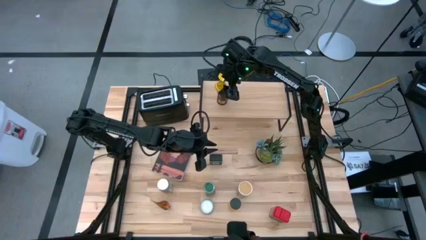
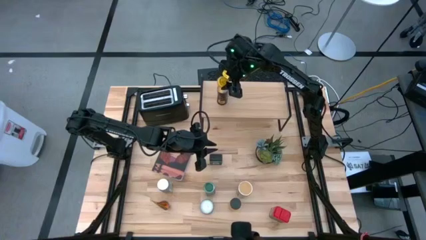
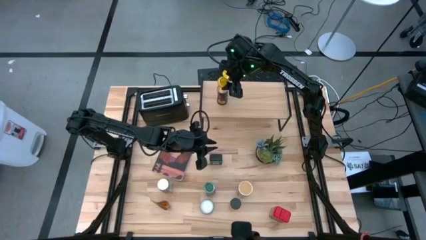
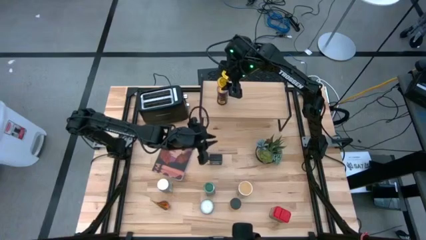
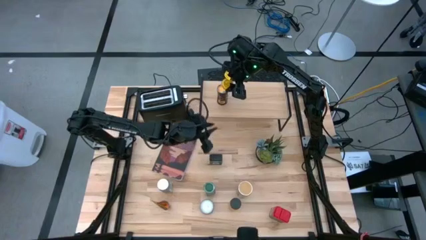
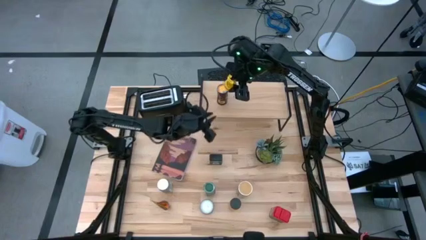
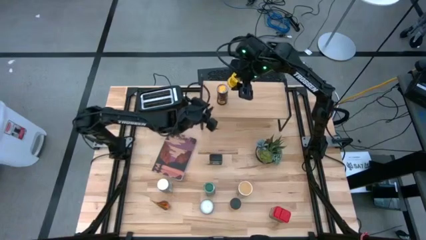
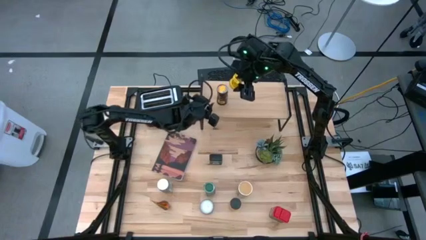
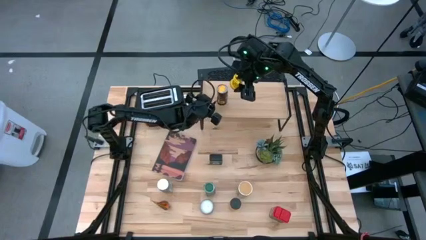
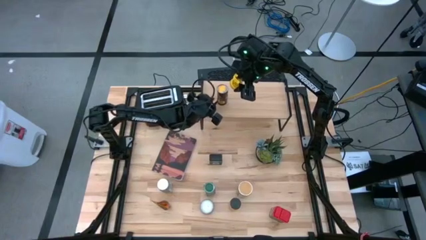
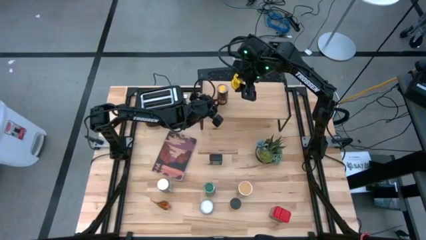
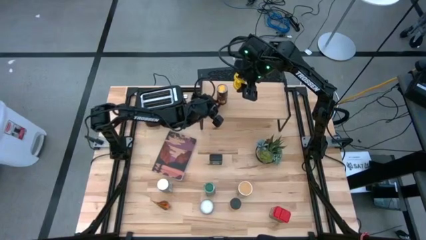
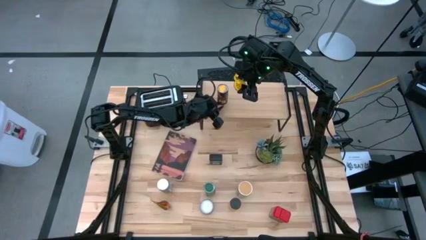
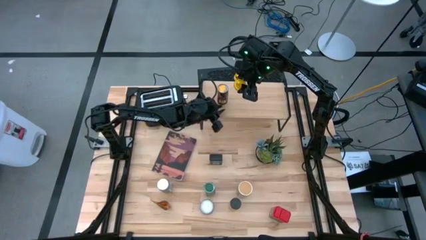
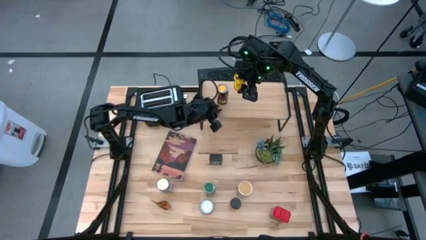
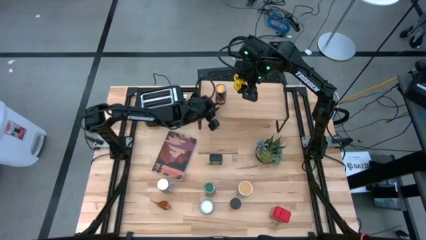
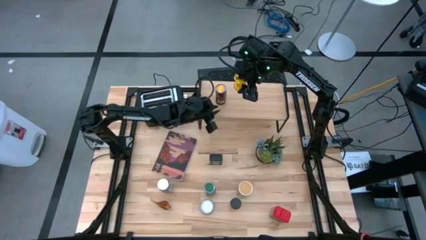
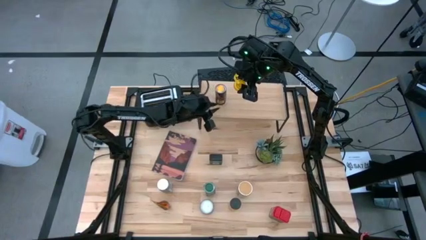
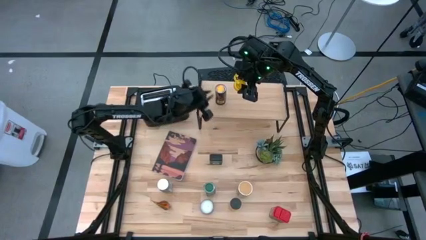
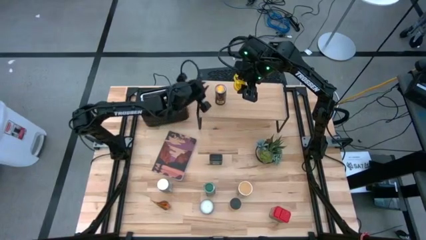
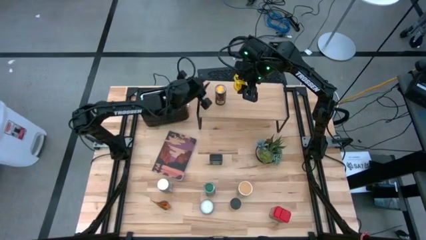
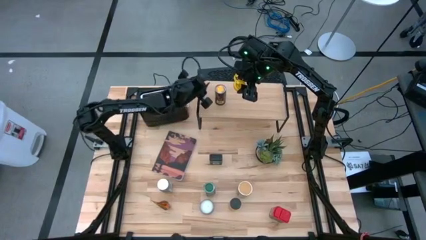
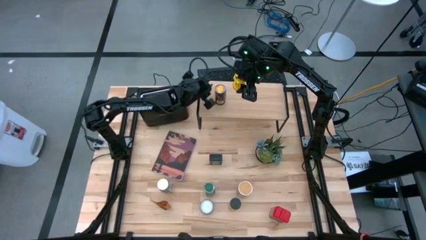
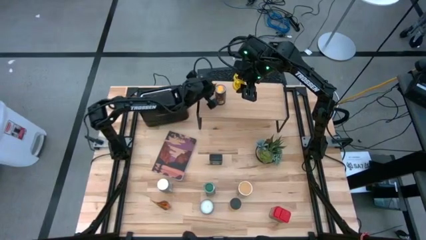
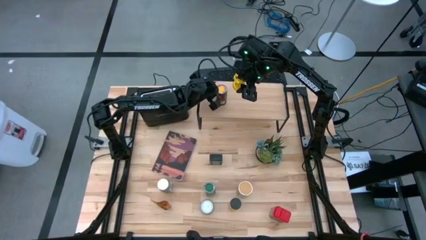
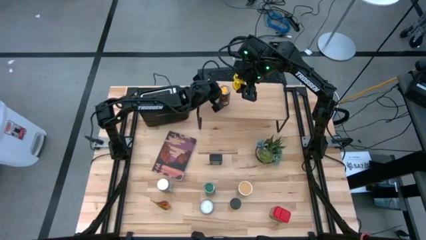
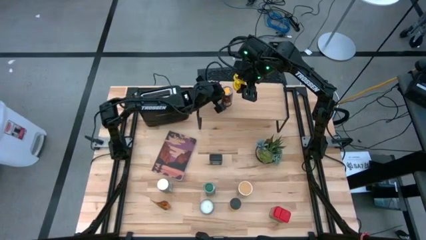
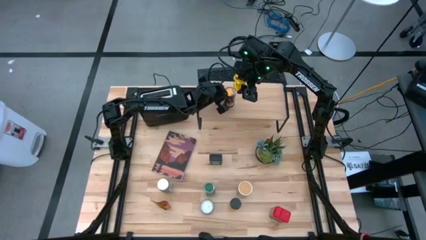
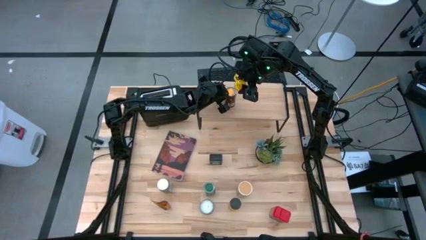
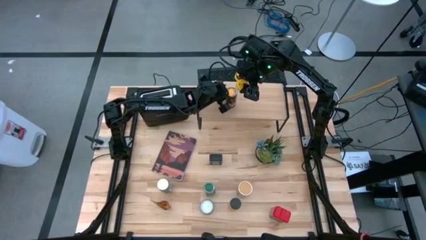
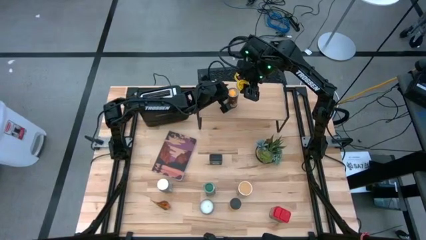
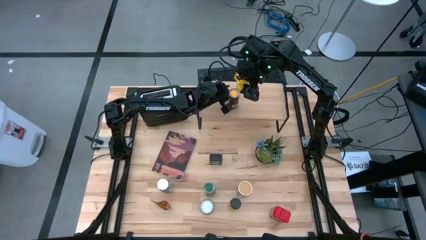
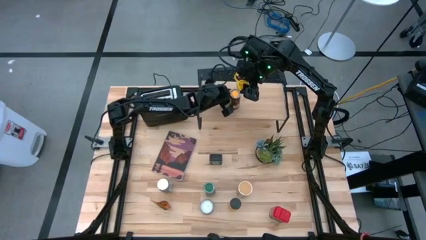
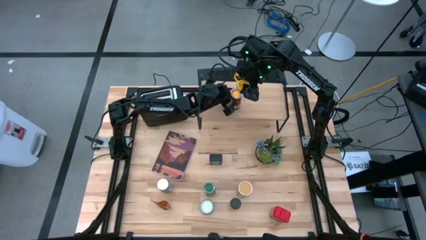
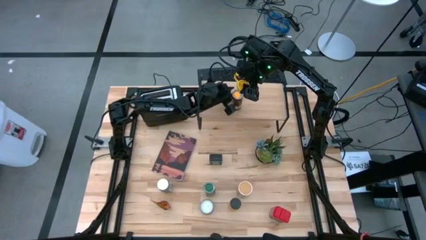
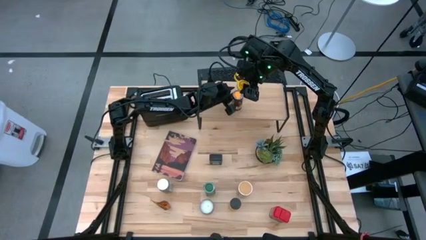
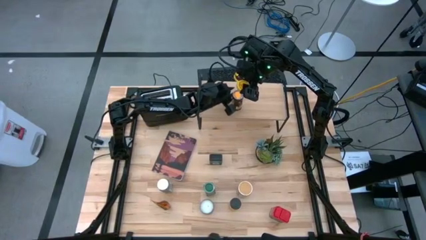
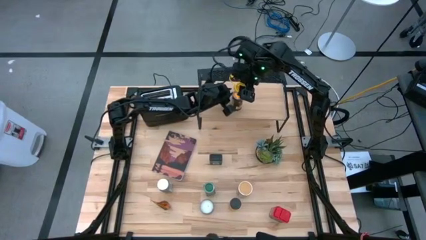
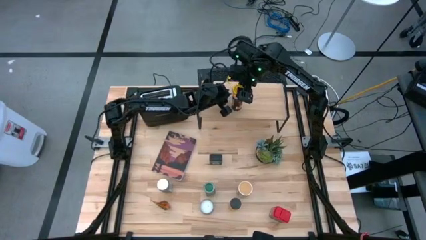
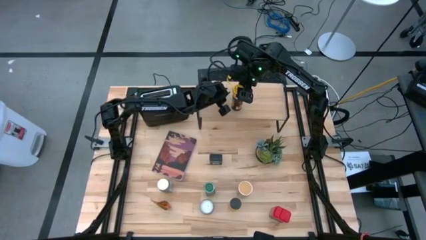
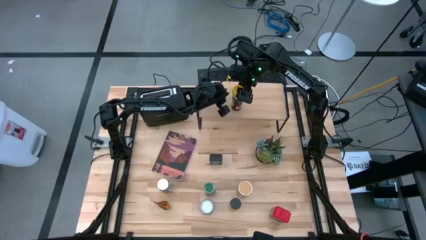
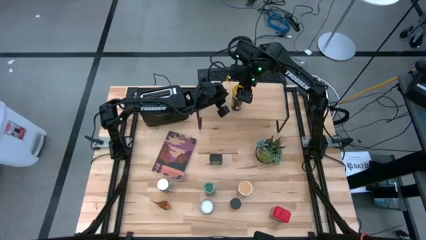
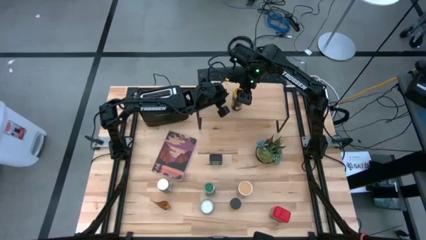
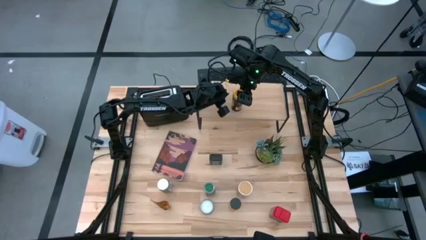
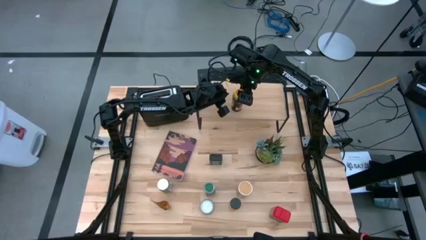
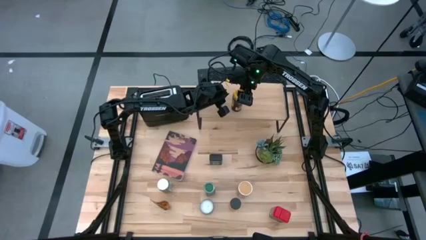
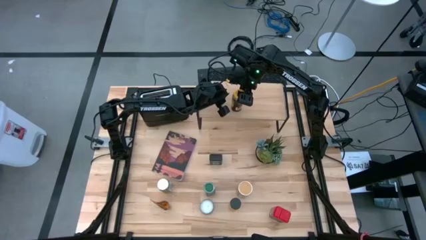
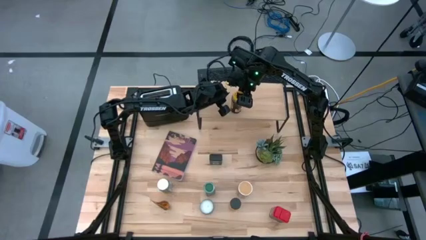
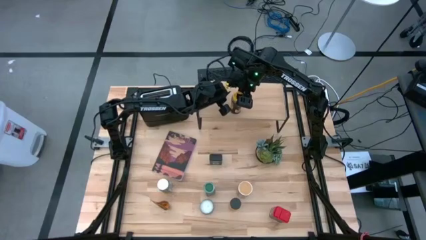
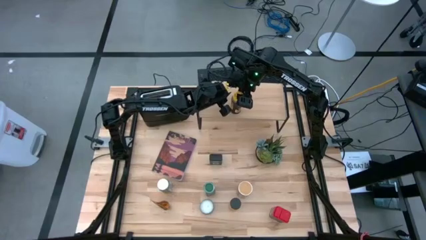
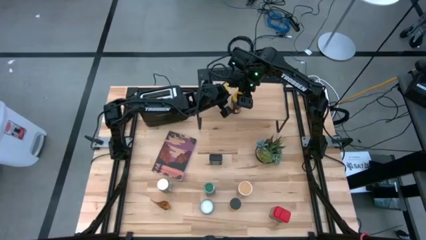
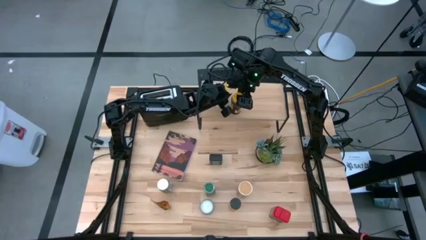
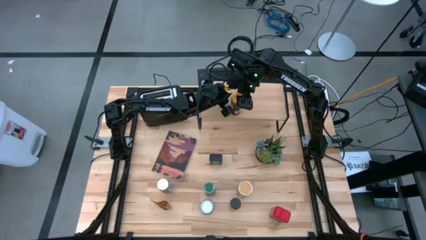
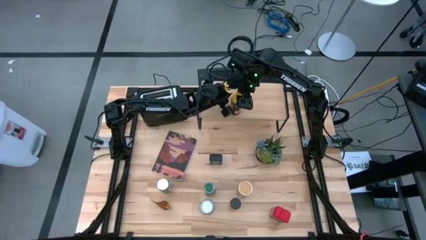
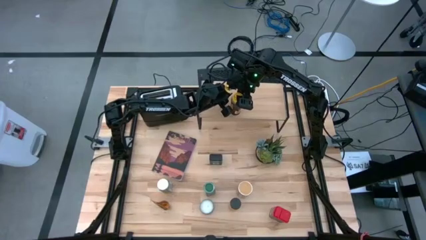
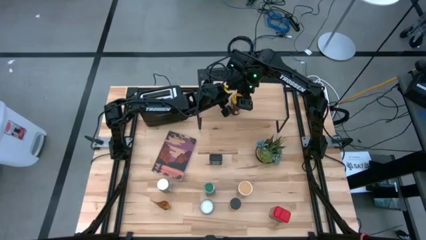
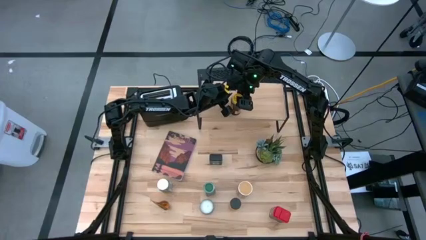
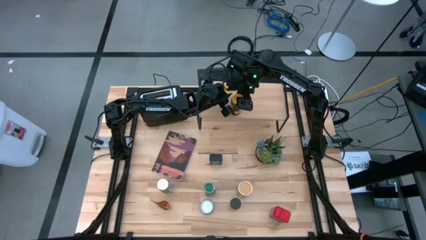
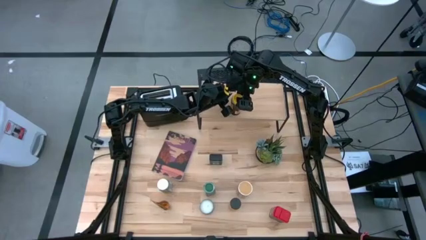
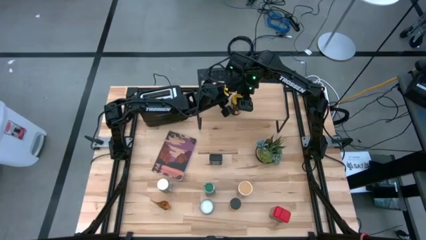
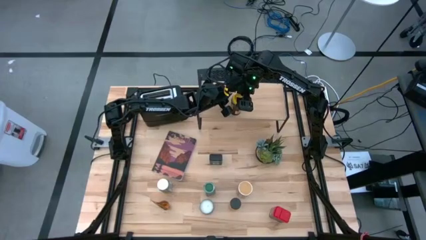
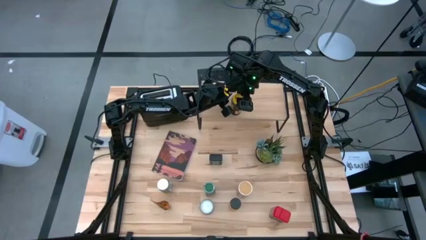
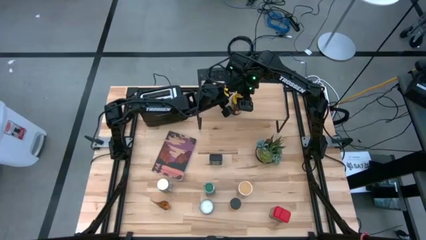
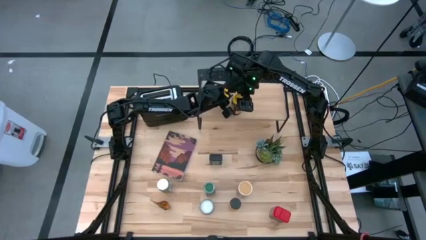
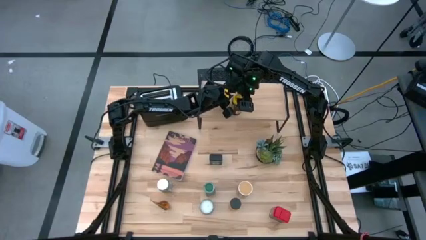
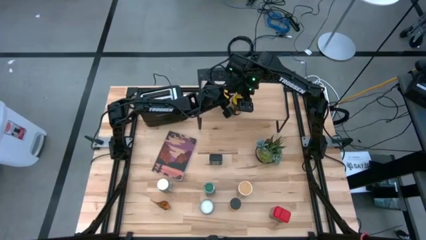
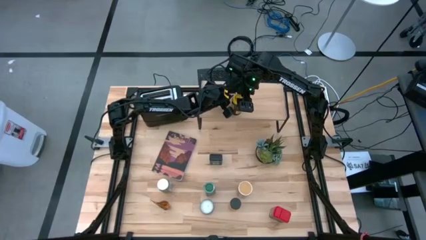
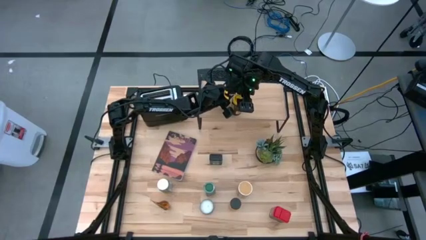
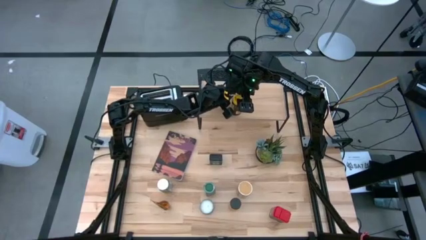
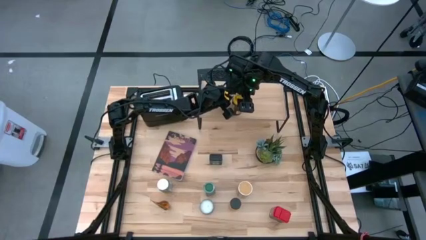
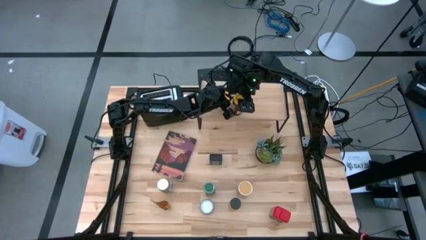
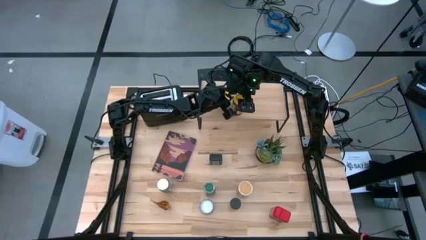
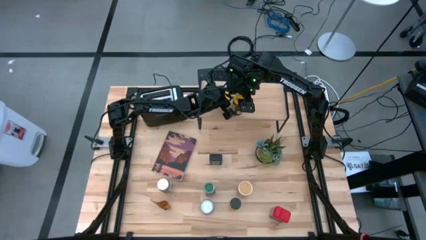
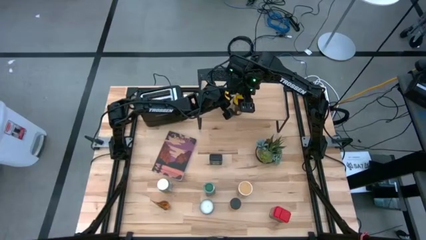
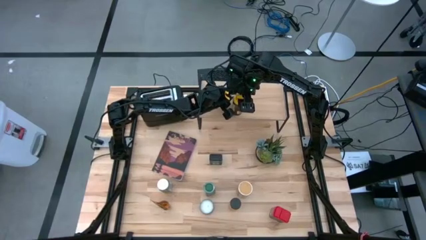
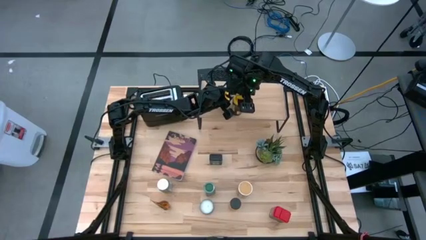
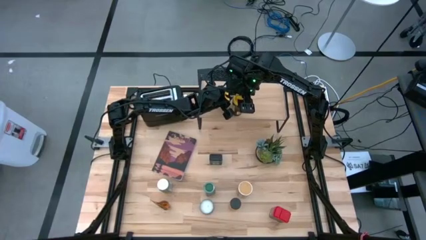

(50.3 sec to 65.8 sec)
Task: Shelf spices
Put the yellow cap into the seasoning bottle

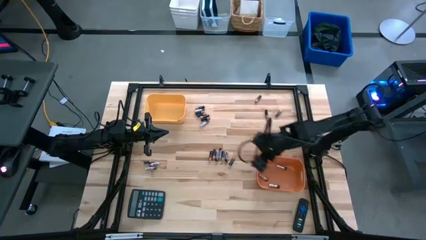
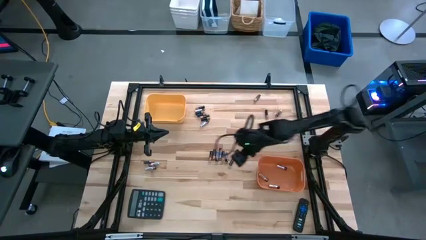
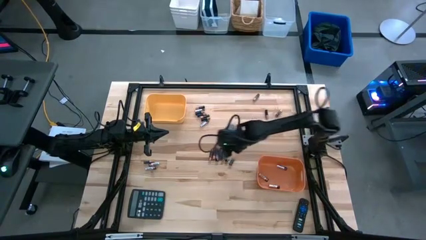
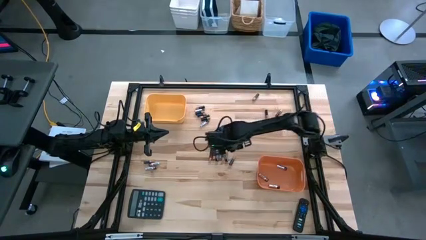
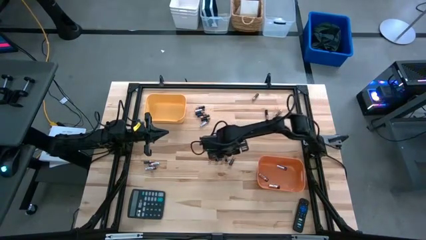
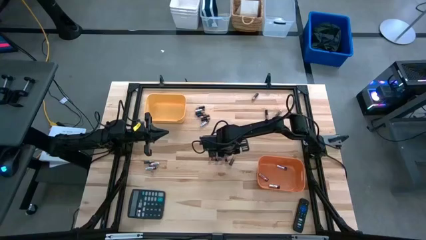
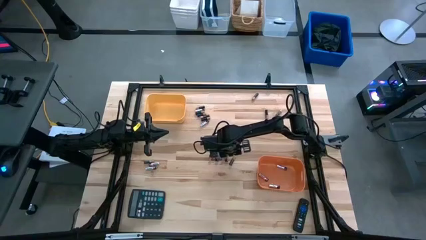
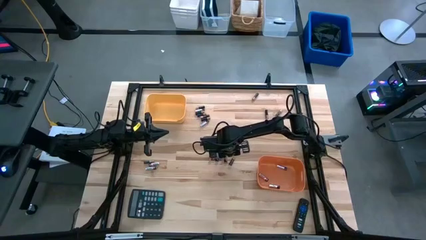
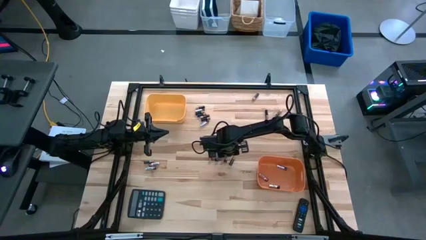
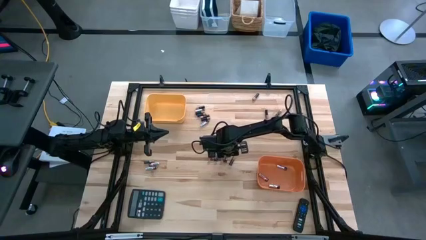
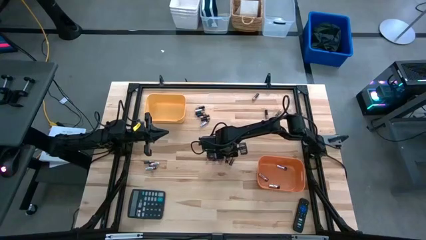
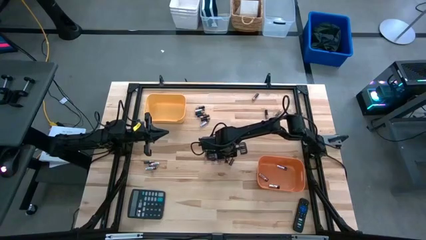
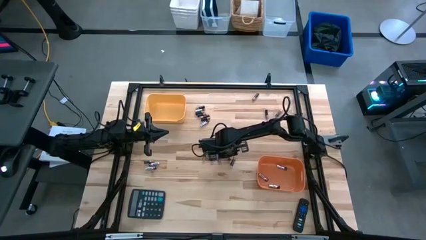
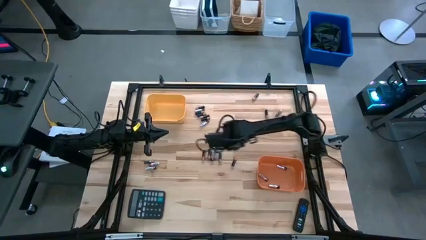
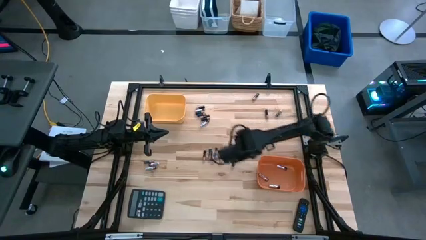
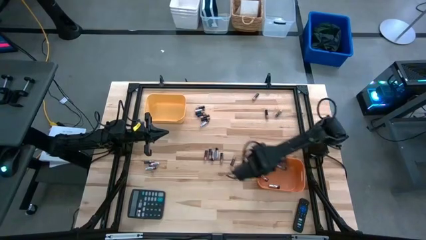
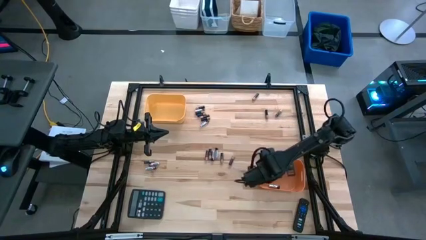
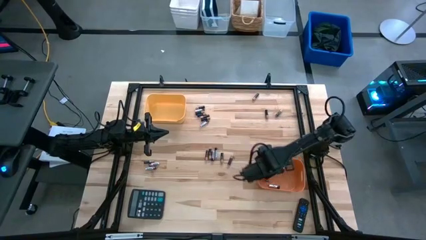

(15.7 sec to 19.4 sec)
Task: Sort batteries
Put the silver battery into the orange bin
